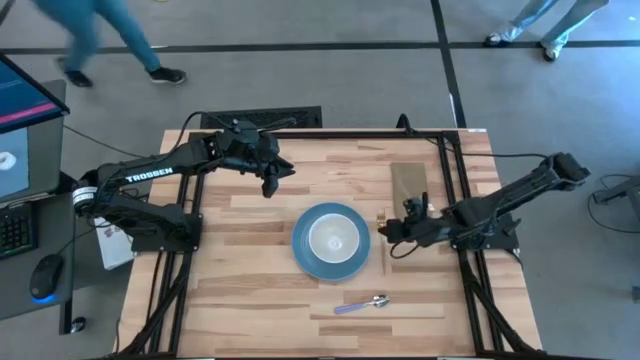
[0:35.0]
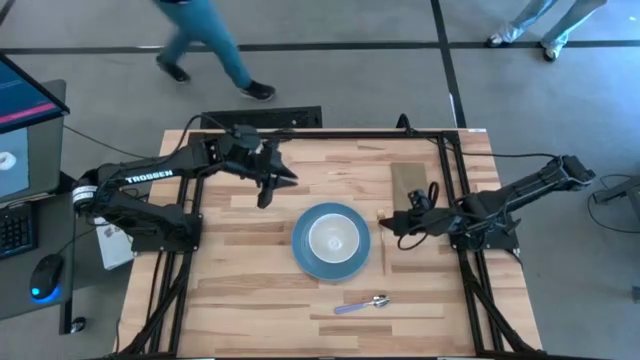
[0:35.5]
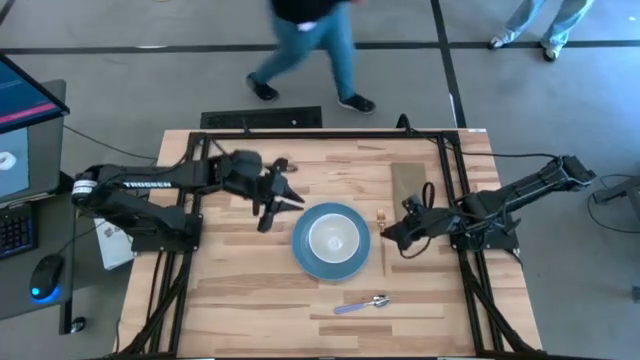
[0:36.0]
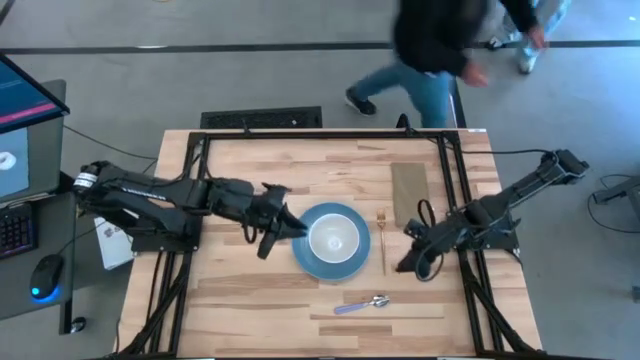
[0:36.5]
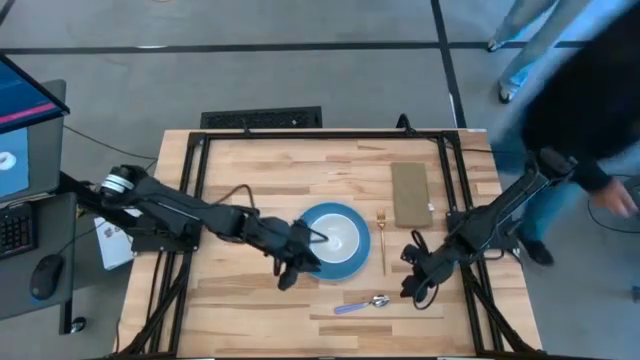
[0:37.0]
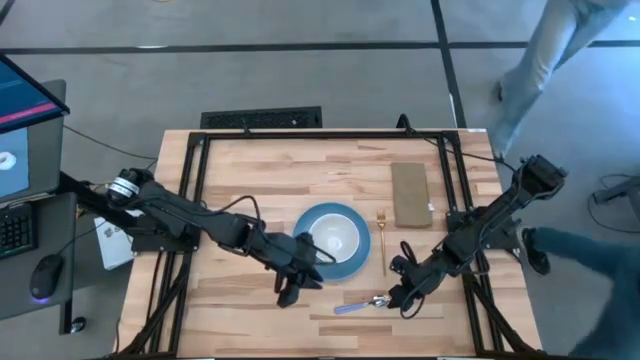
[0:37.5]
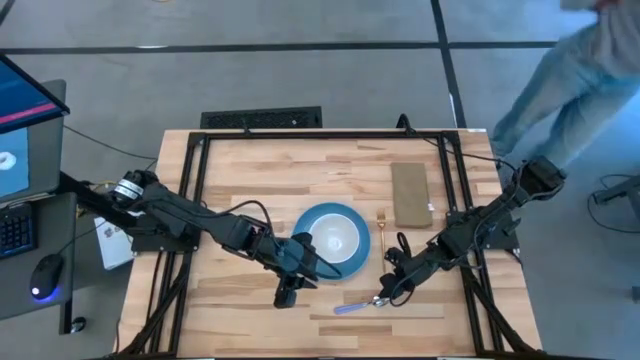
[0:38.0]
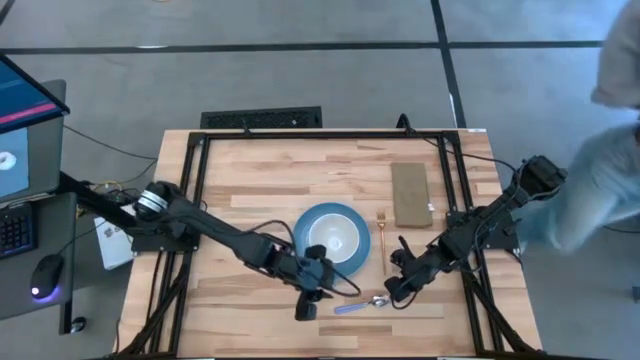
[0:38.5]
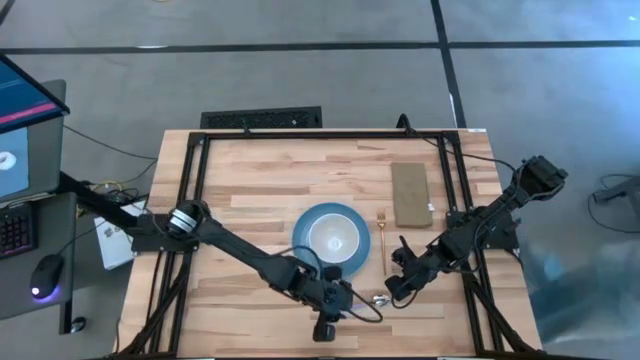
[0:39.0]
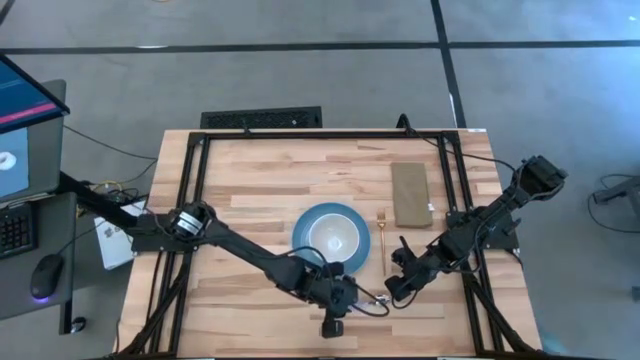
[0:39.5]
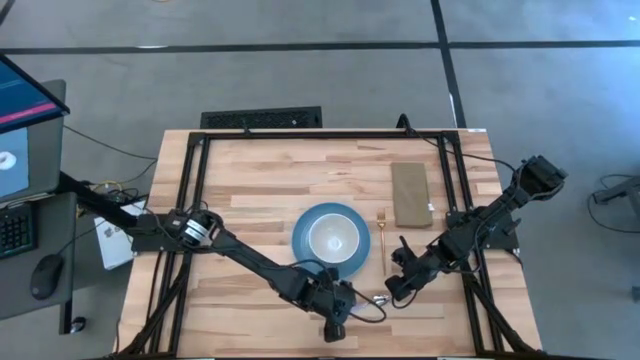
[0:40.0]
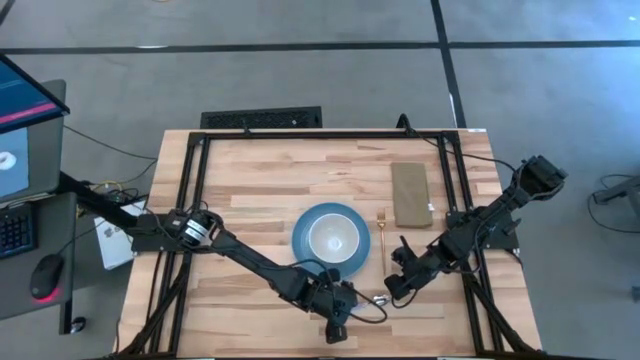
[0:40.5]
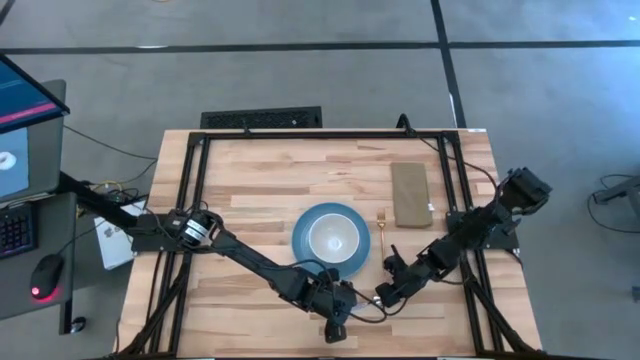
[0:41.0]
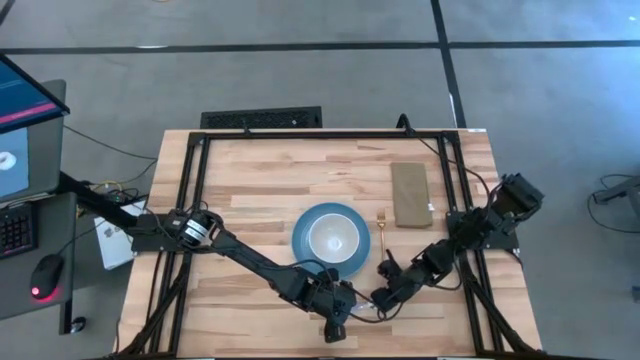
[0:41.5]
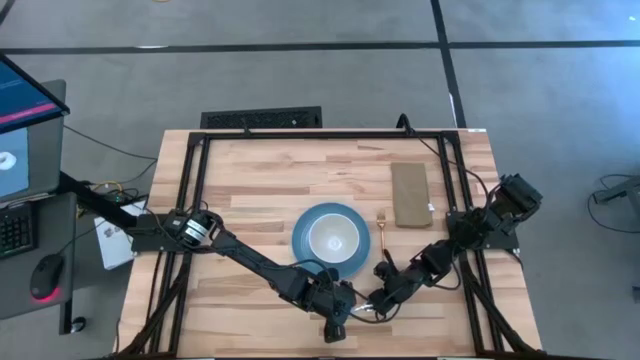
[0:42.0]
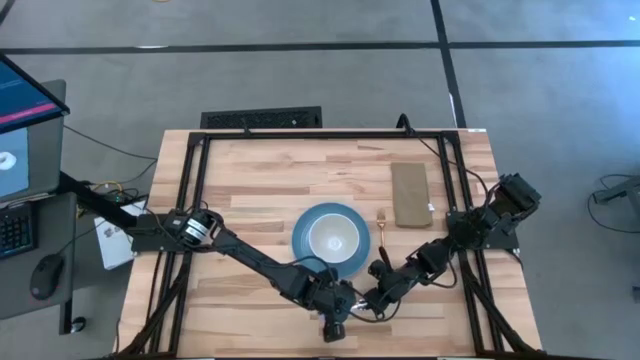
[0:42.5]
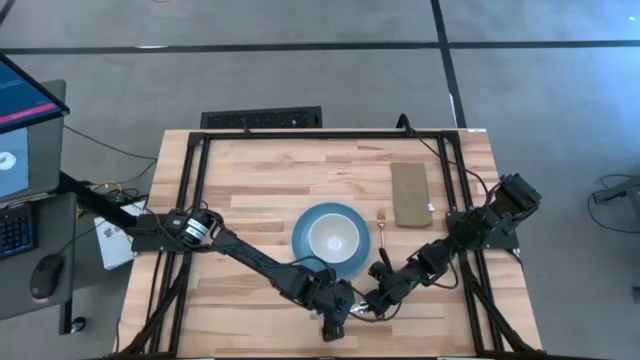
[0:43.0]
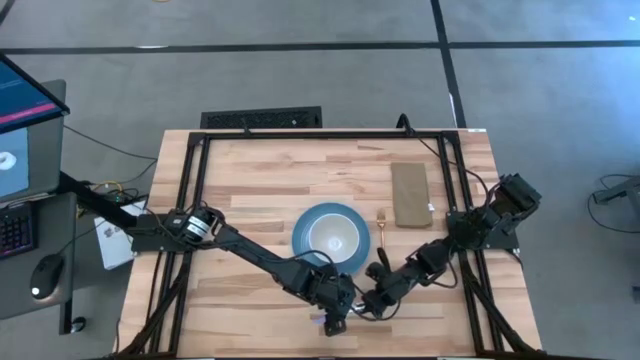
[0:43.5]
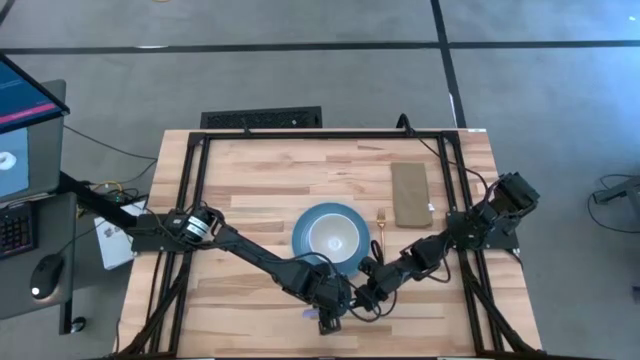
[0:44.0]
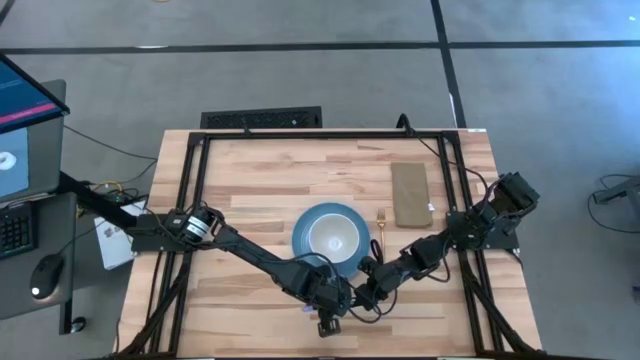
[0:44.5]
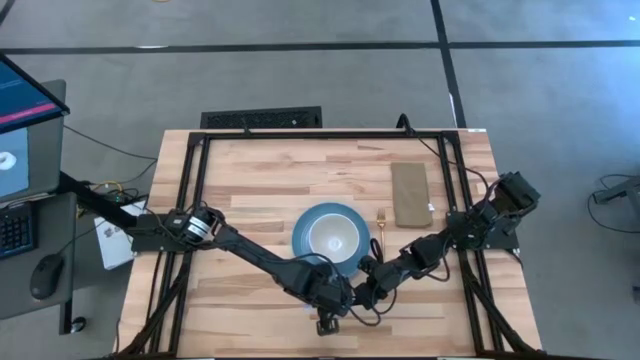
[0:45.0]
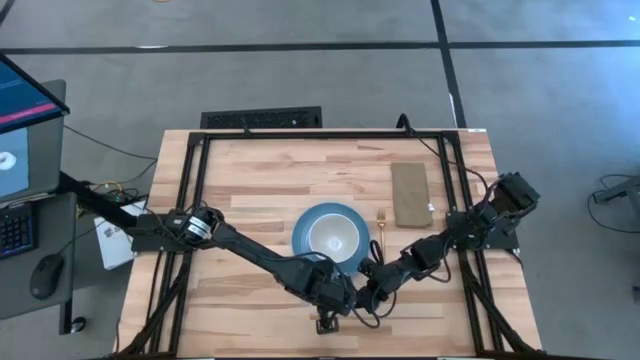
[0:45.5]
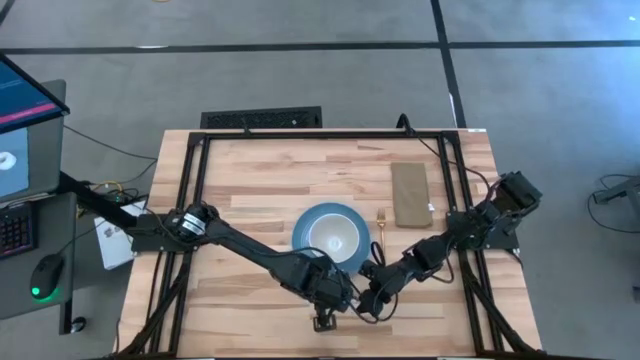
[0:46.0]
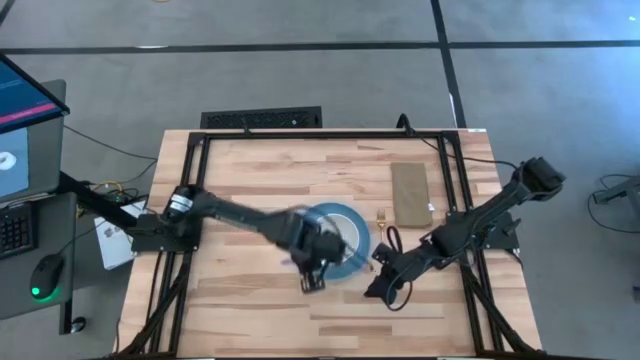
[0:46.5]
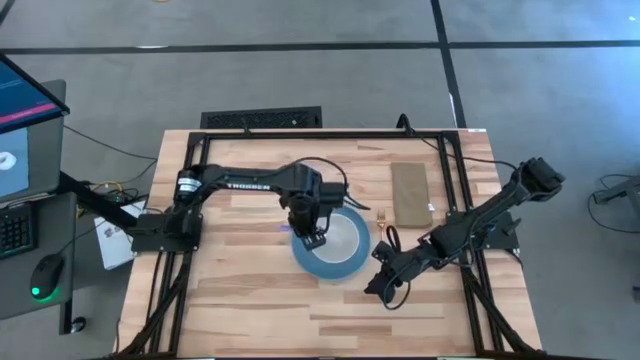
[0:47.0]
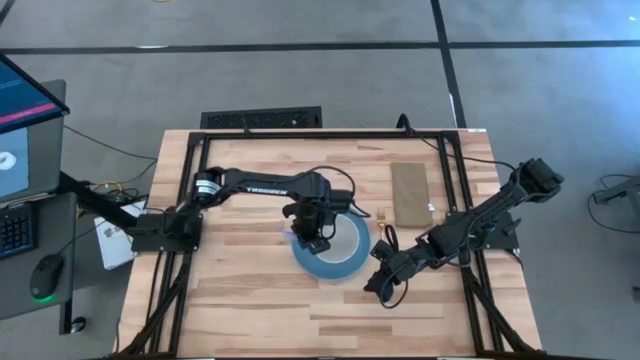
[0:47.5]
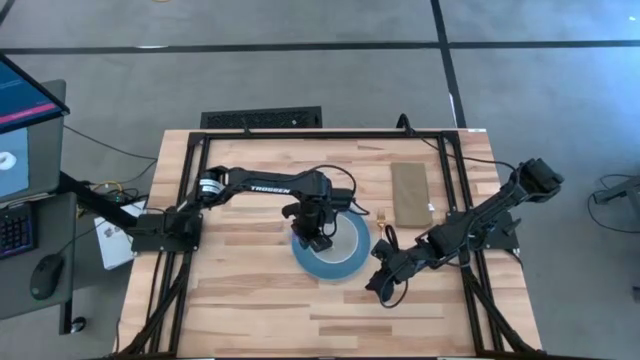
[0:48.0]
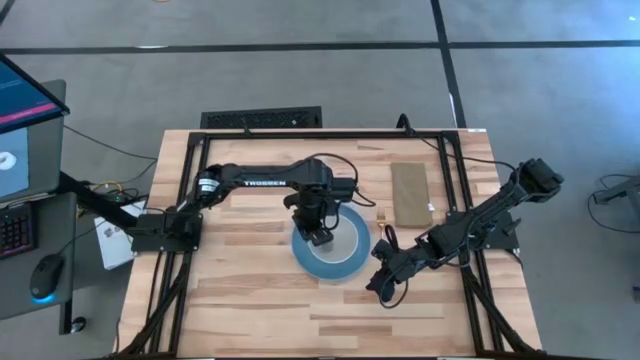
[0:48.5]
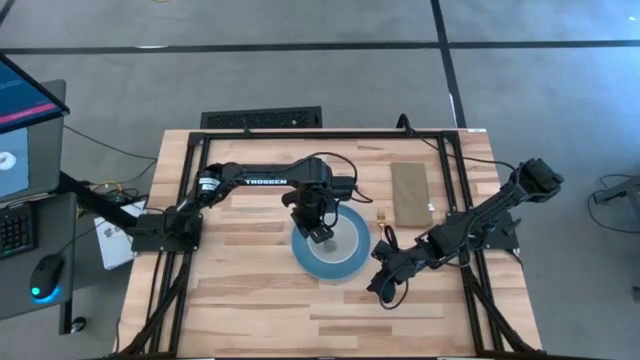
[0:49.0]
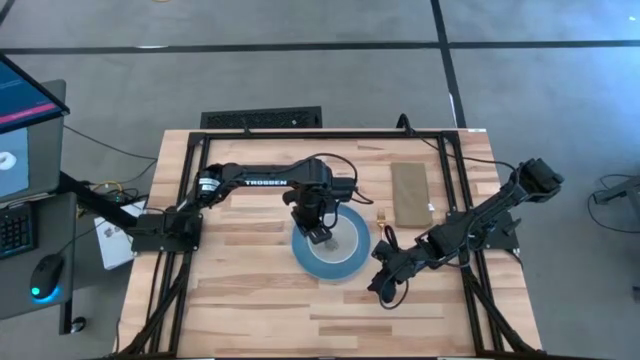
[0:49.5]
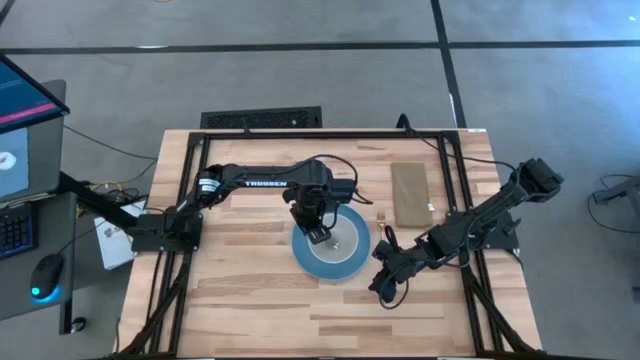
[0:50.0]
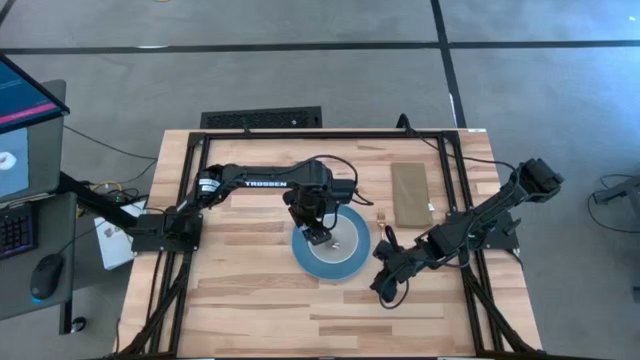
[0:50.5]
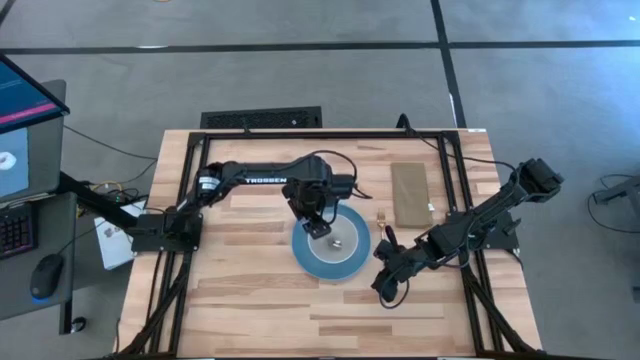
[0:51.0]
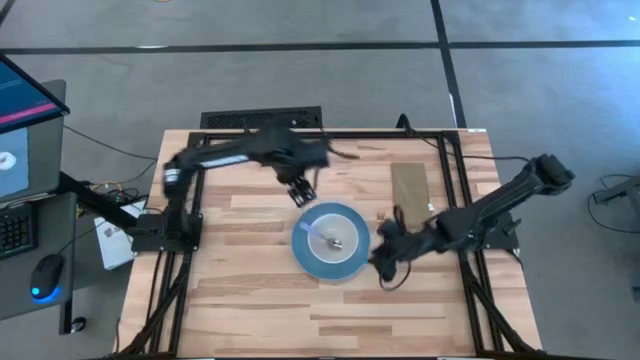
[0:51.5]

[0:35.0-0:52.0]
Task: Set table place
Place the small silver tool inside the white bowl

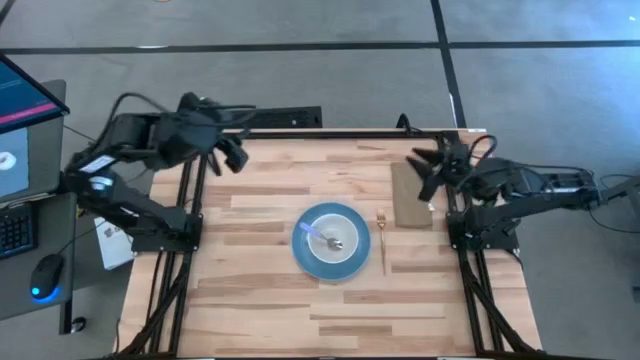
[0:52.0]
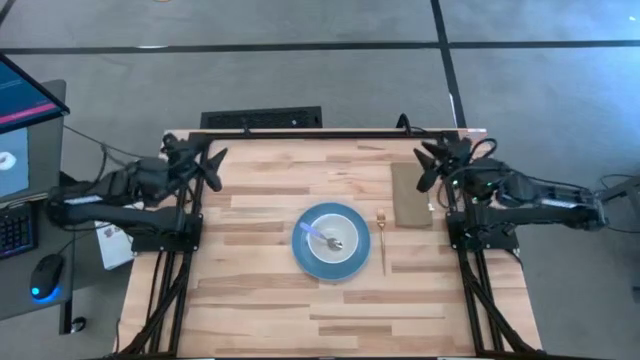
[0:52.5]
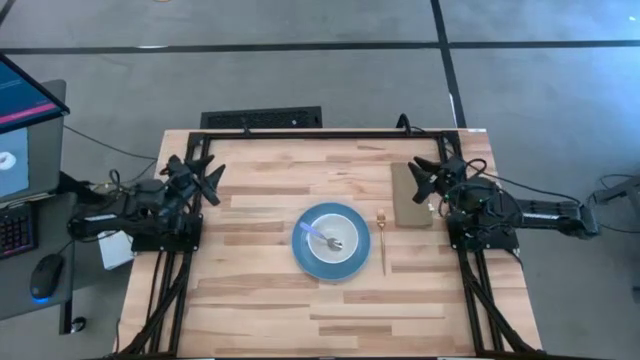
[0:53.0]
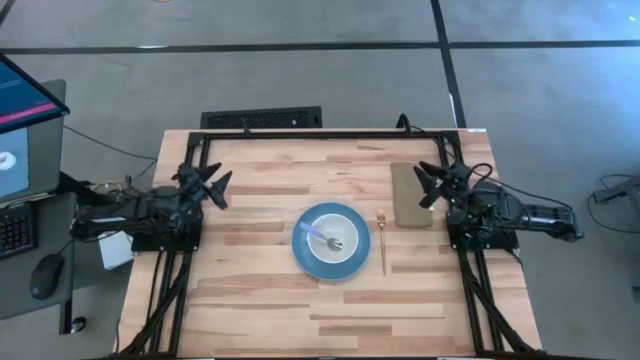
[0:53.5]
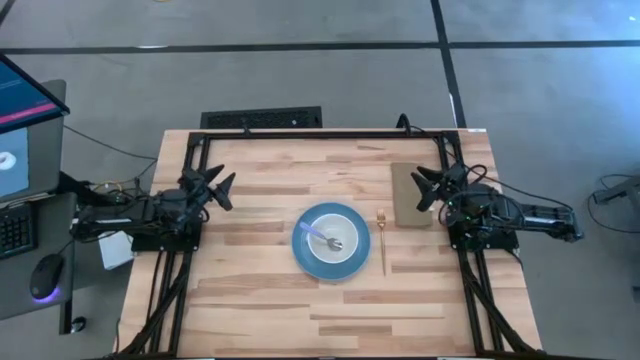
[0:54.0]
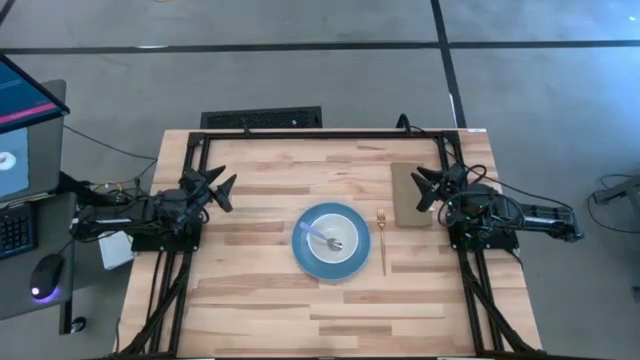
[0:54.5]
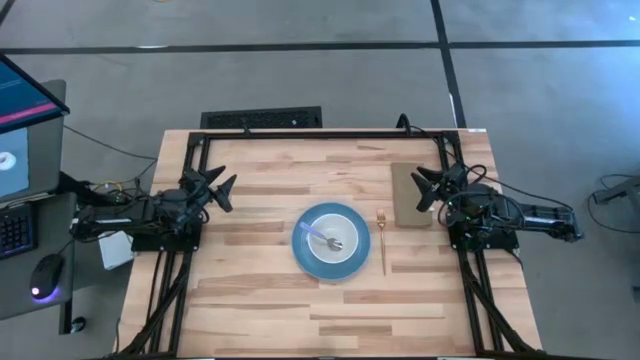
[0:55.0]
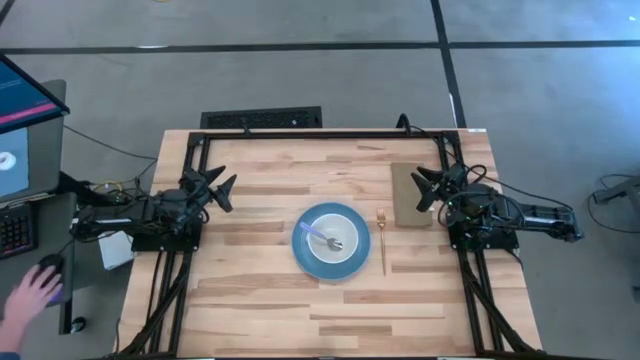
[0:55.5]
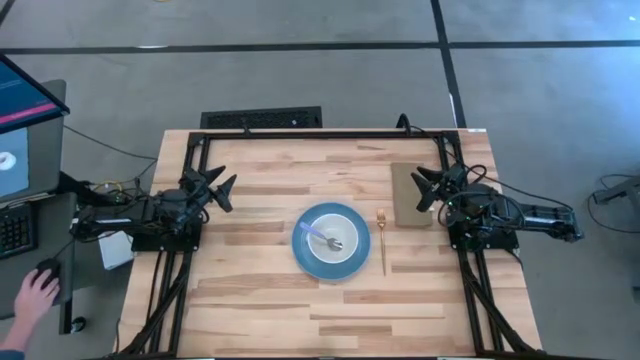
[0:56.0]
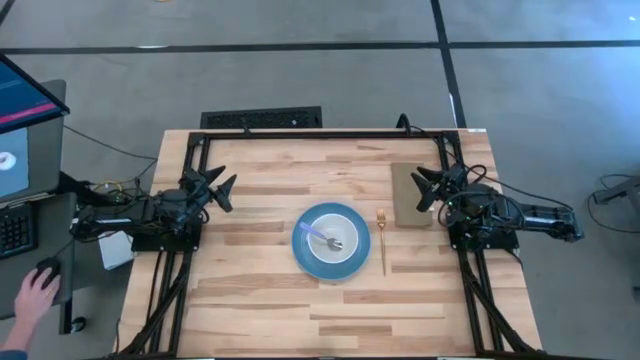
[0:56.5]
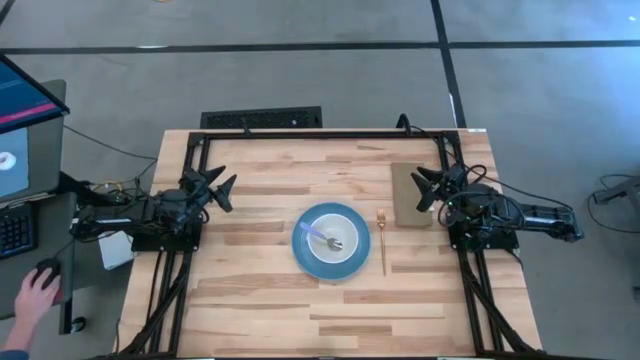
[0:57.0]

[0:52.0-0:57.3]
Return to Home Position
